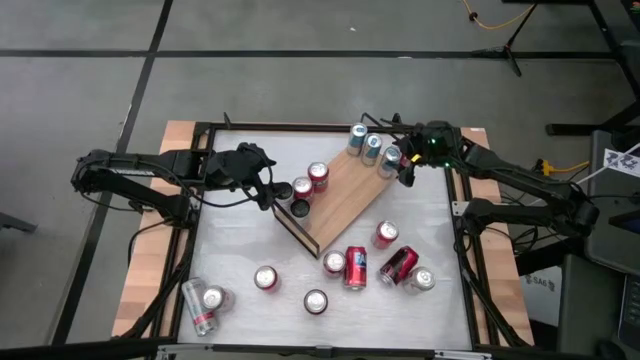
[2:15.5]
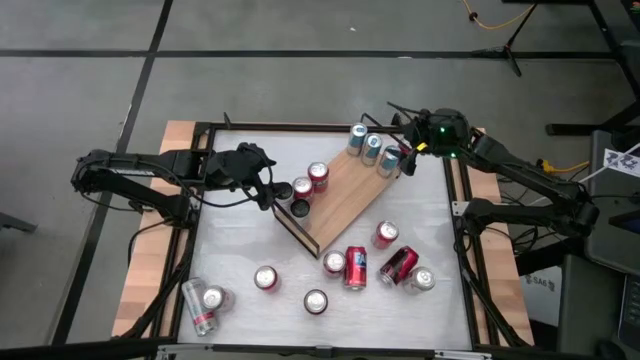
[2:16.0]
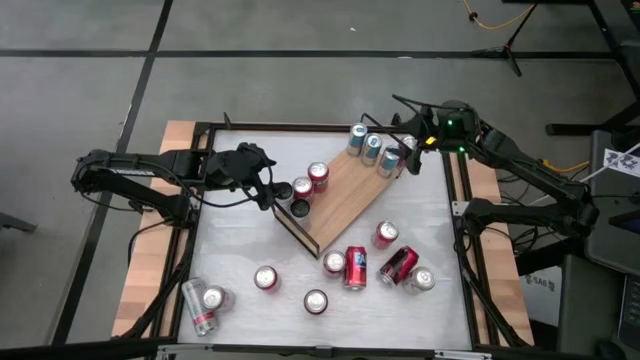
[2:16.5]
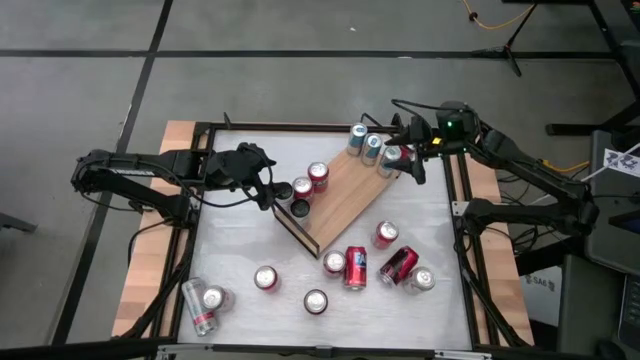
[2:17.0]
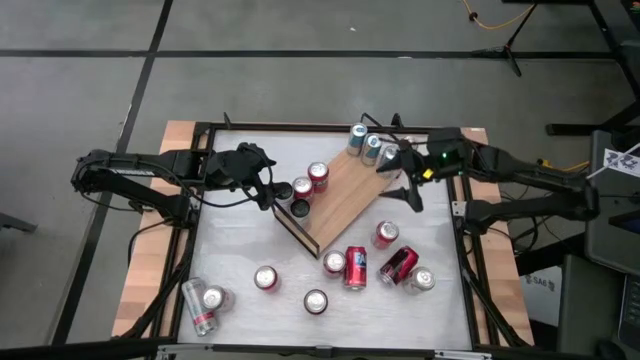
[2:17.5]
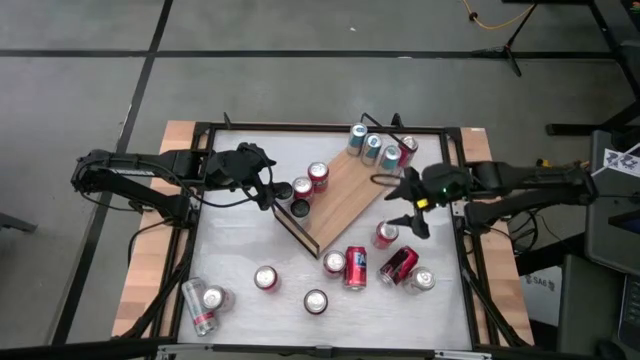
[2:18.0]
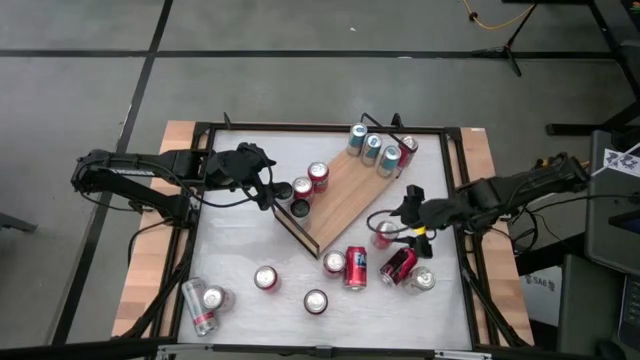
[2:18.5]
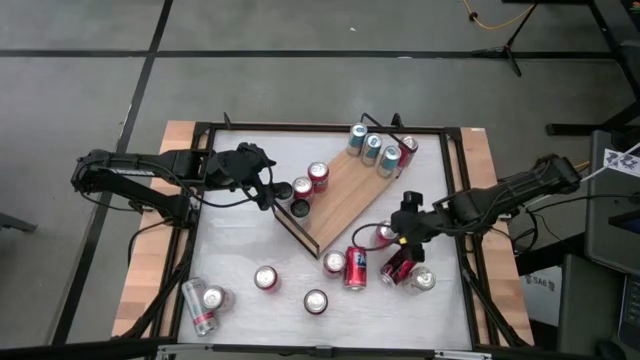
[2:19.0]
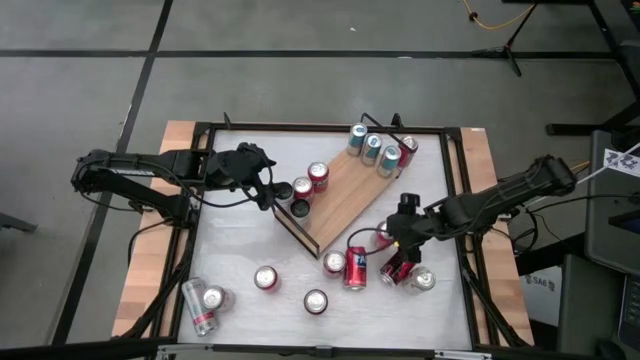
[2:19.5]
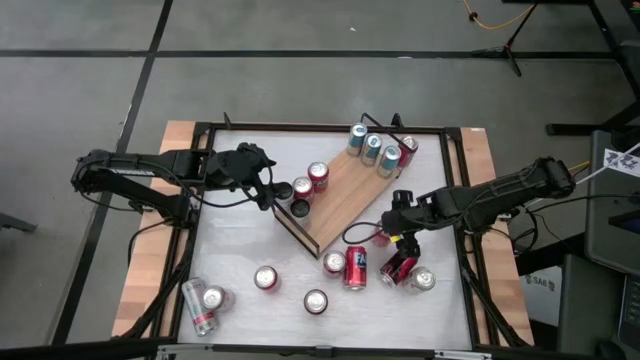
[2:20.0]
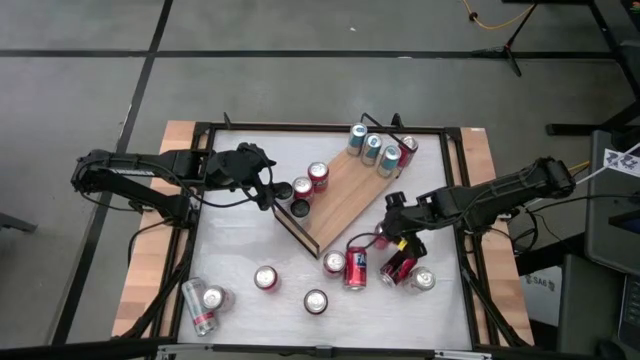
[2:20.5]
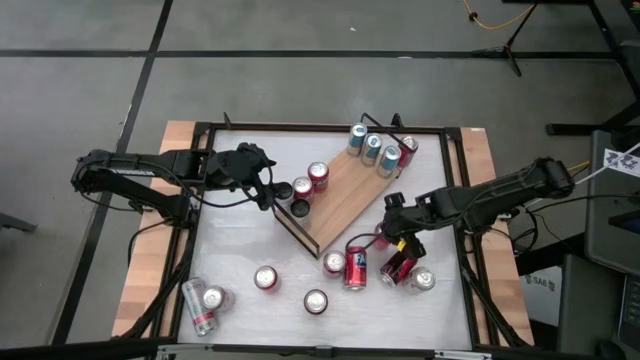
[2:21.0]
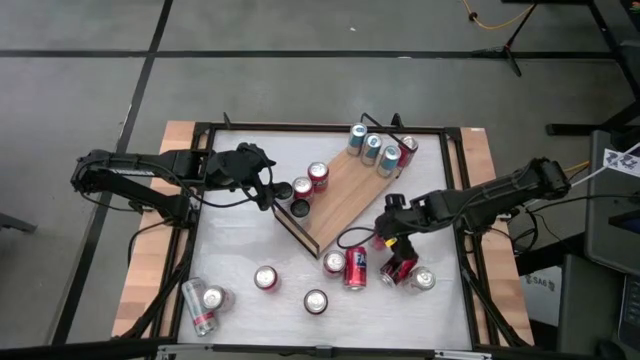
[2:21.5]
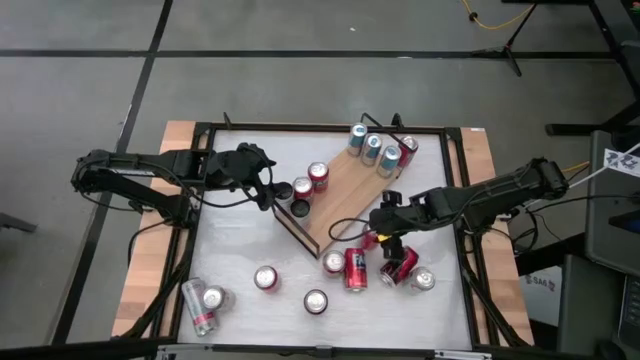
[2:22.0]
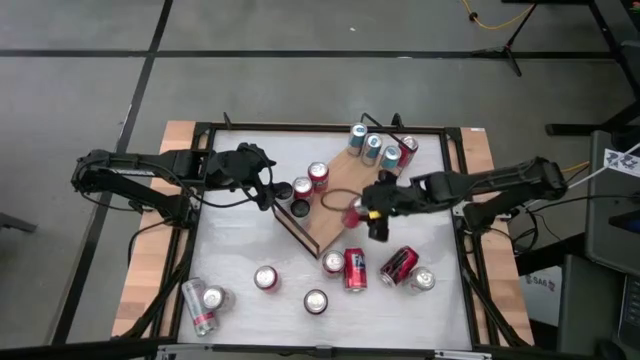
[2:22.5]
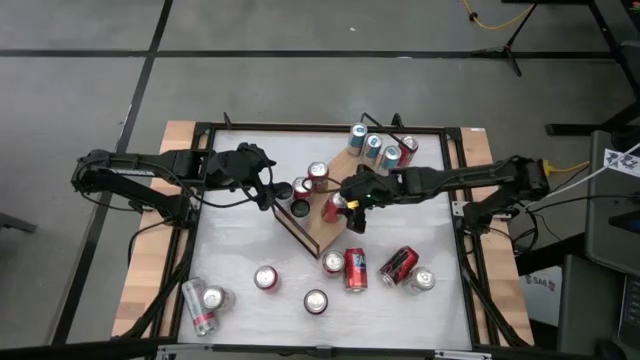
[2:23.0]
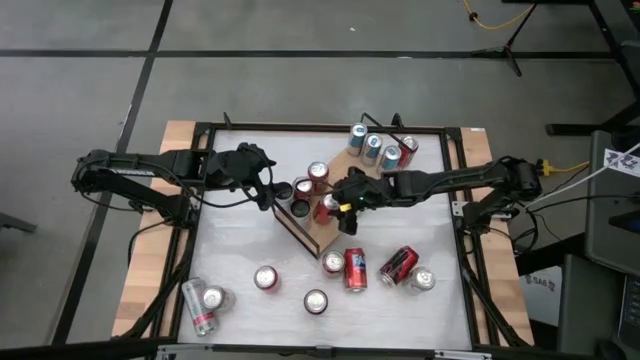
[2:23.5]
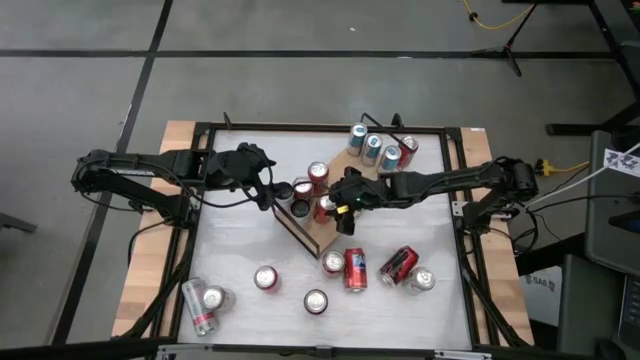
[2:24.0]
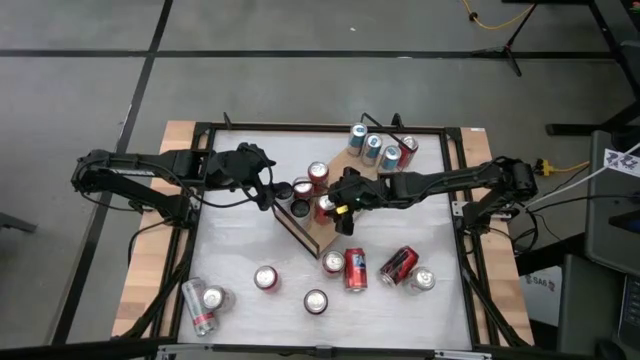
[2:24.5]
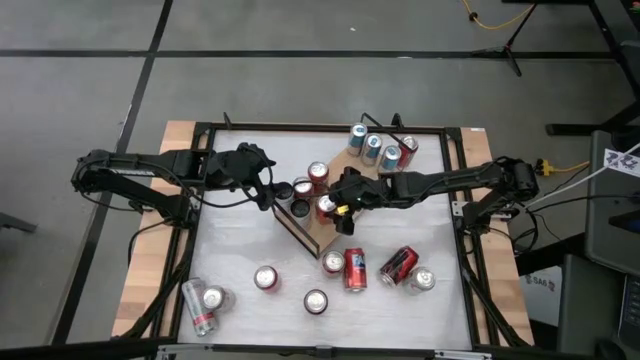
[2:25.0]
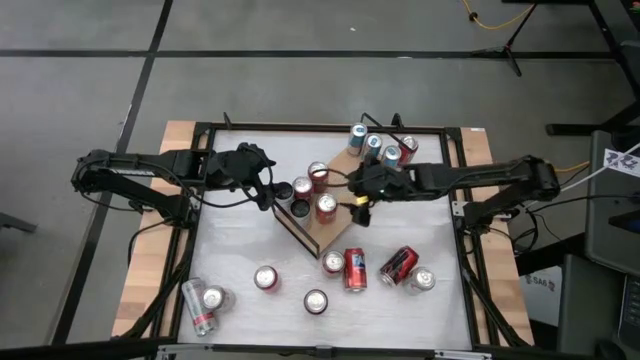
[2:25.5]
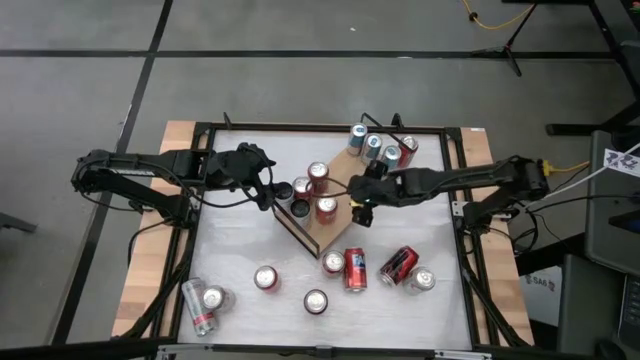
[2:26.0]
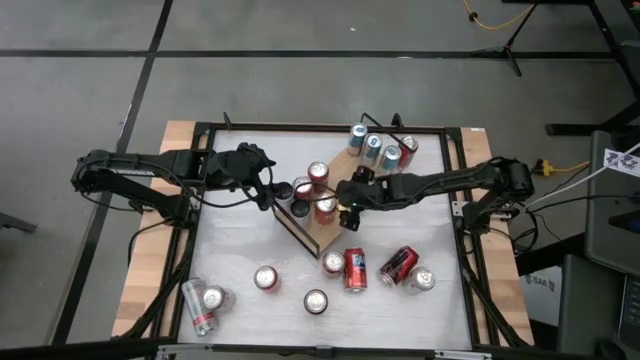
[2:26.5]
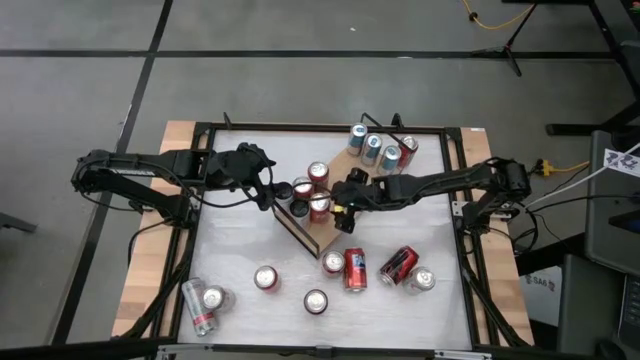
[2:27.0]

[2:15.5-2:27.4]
Task: Place canned beverage on shelf
Put the orange soda can on the shelf aligned with the other orange soda can

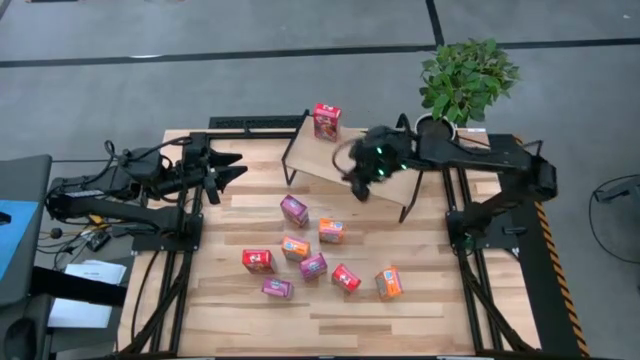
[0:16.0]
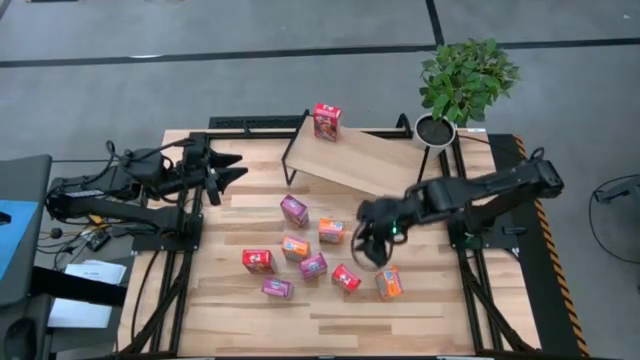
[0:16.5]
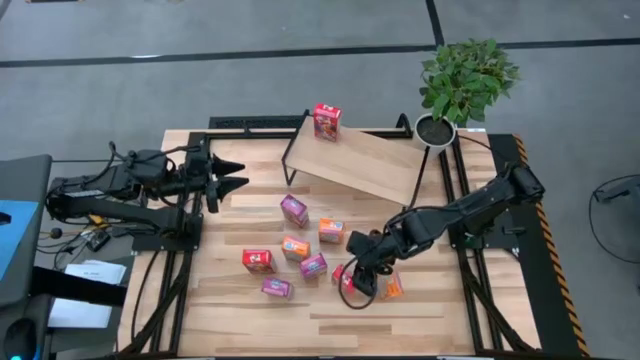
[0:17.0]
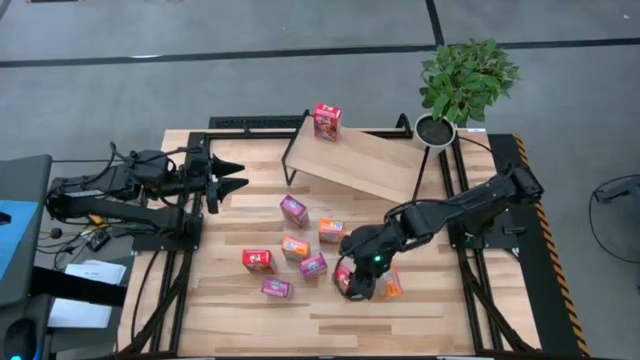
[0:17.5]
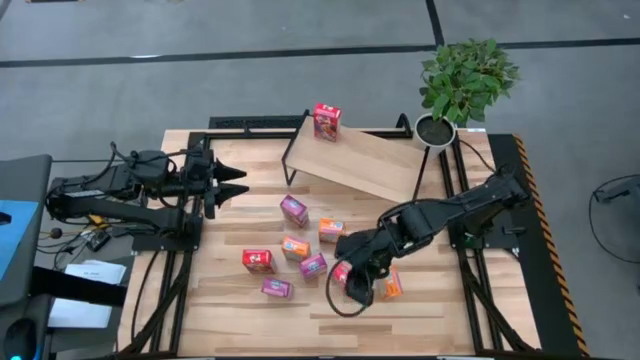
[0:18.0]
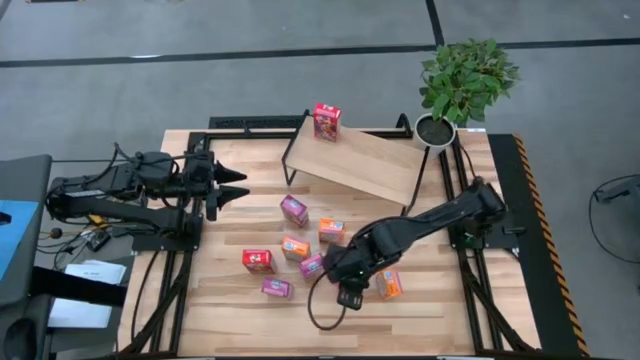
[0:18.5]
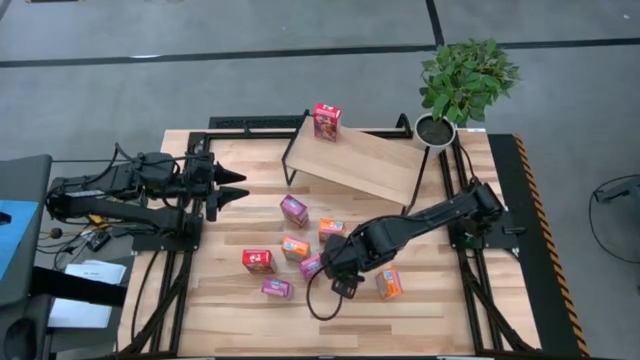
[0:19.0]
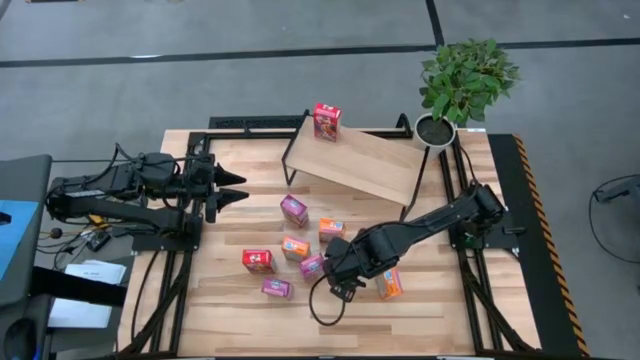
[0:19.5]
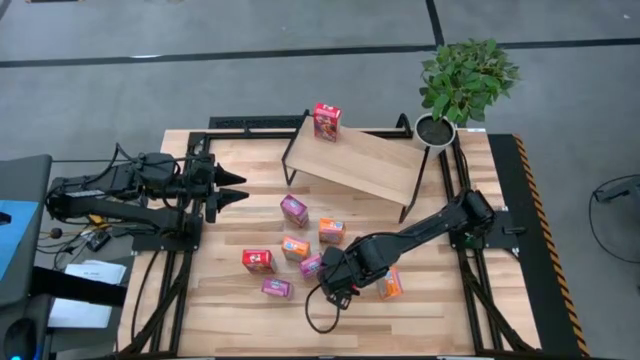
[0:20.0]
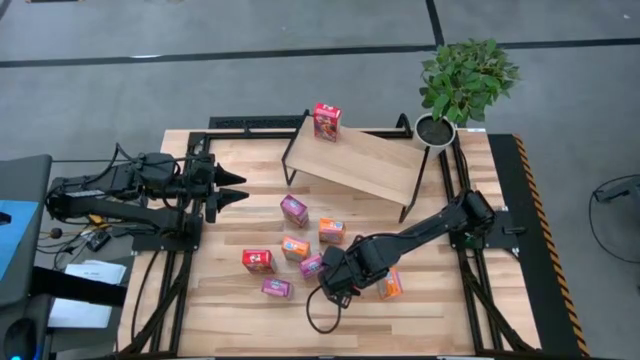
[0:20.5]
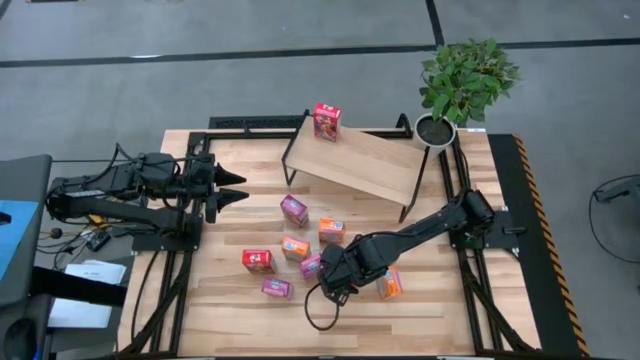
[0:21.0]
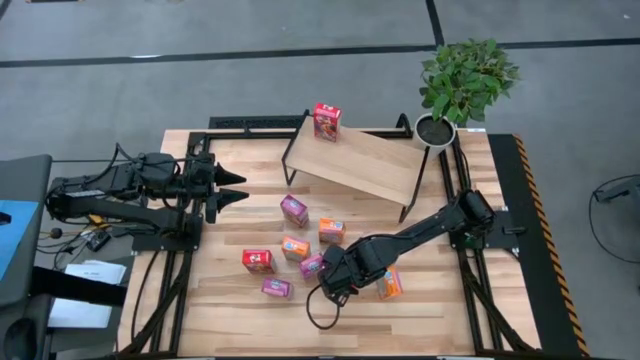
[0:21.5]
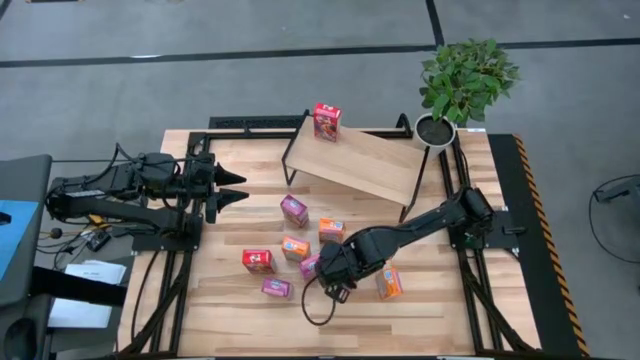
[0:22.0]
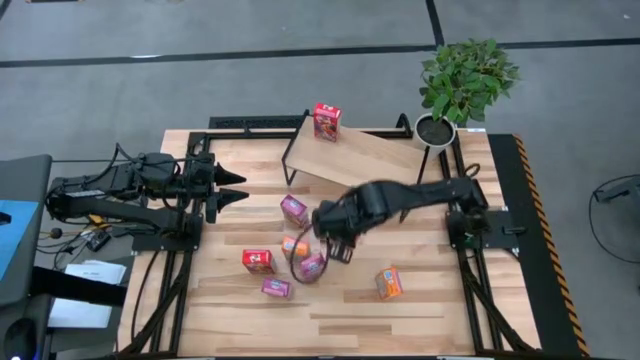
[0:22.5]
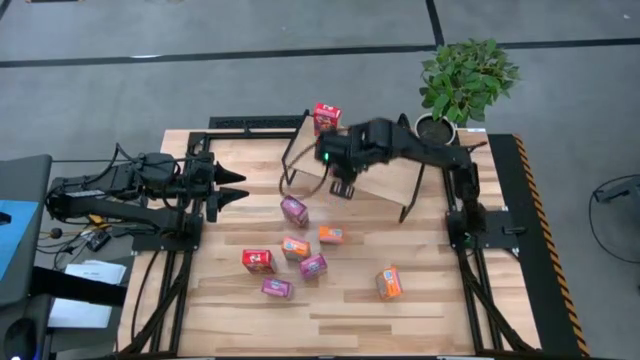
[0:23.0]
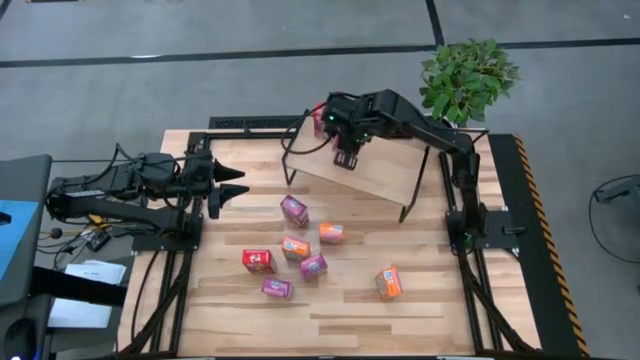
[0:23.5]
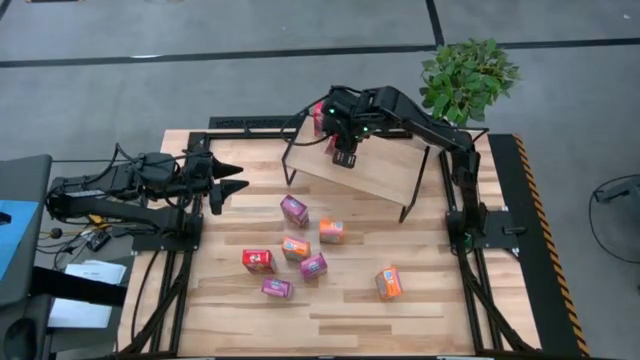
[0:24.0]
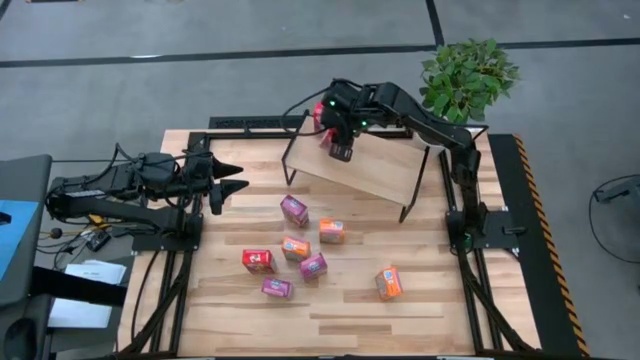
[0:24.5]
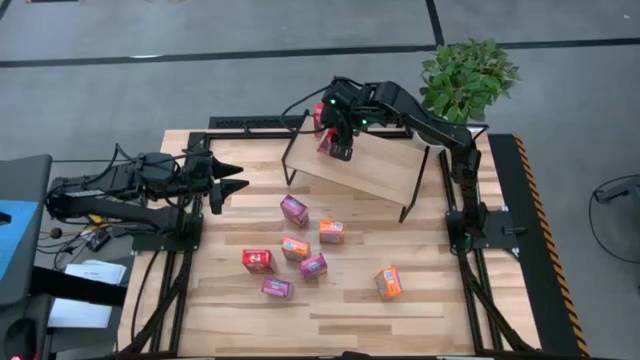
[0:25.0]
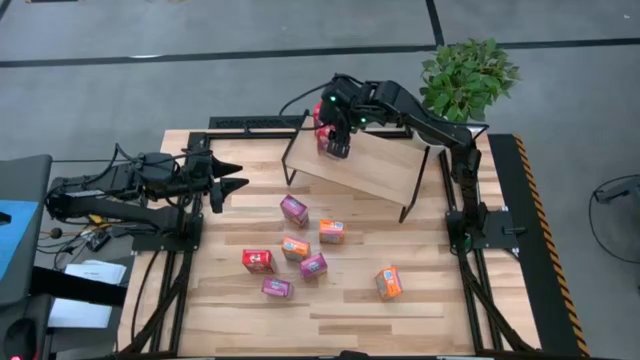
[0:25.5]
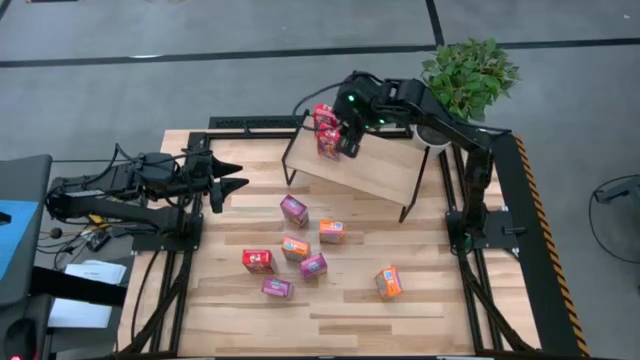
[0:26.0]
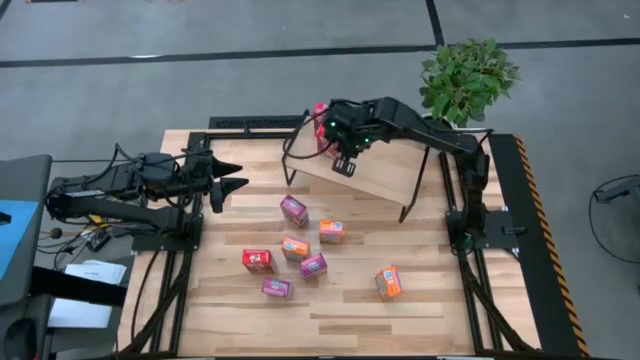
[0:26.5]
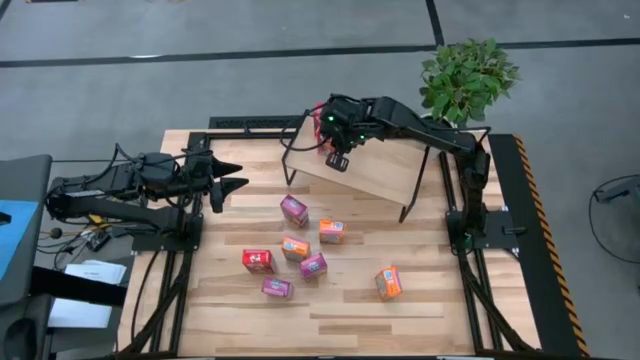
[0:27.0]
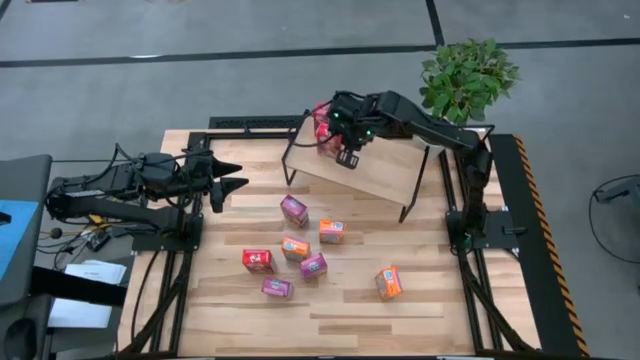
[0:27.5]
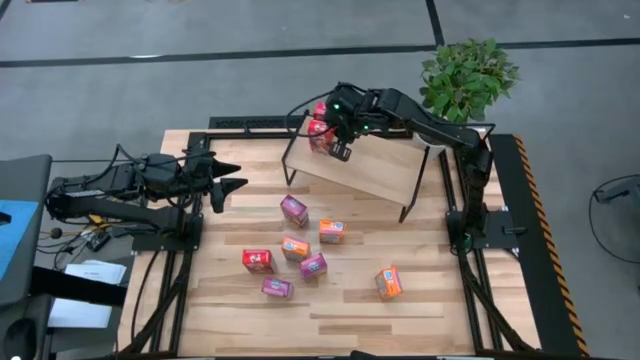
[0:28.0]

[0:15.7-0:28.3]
Task: Stack cereal on shelf
Put the right red cereal box on the shelf aligned with the other red cereal box
